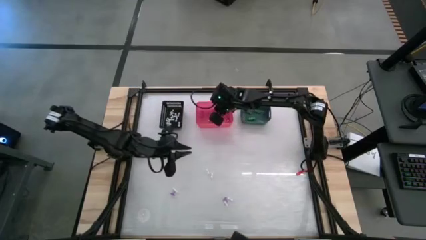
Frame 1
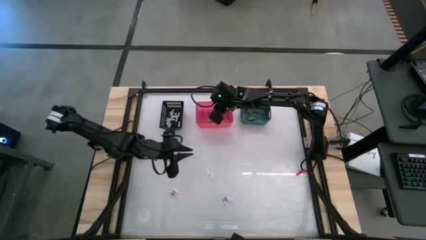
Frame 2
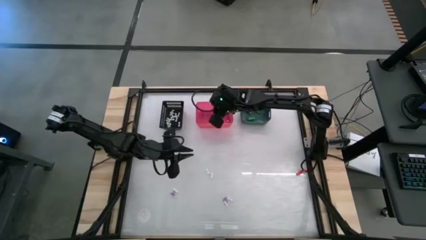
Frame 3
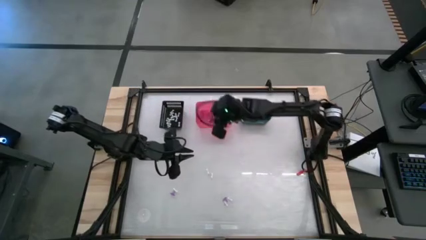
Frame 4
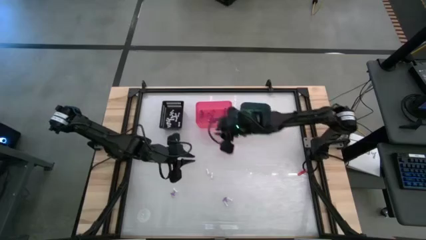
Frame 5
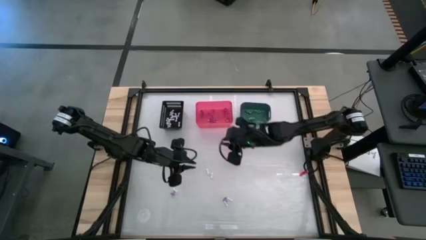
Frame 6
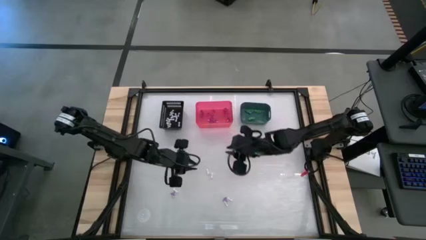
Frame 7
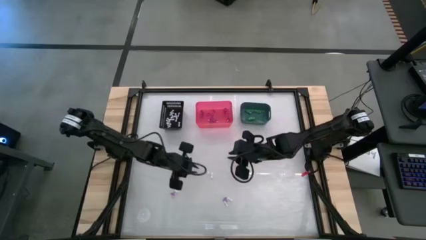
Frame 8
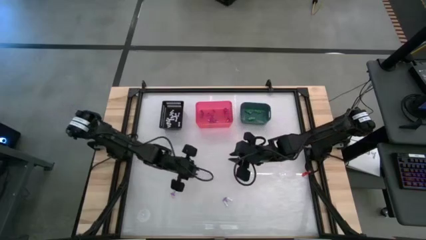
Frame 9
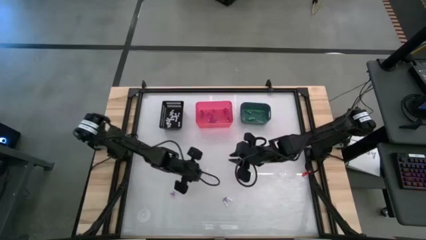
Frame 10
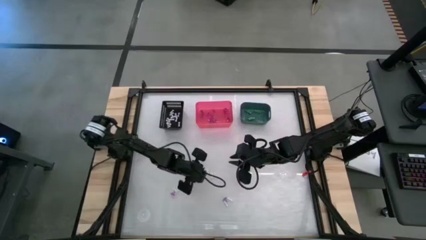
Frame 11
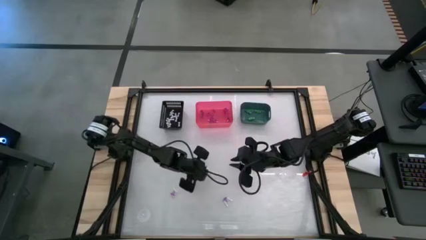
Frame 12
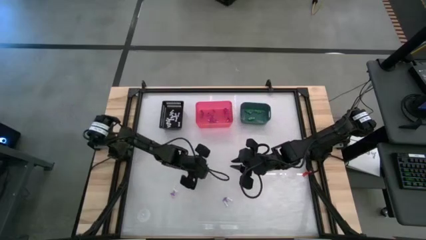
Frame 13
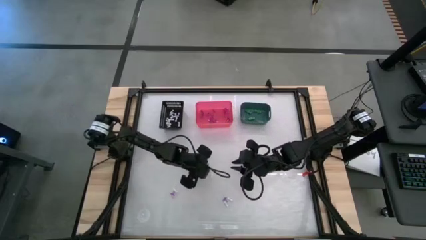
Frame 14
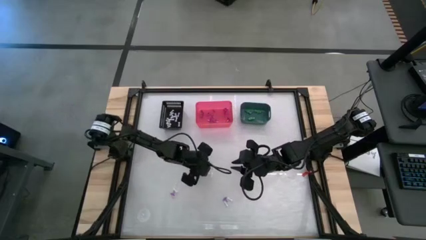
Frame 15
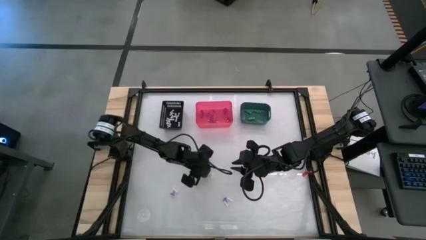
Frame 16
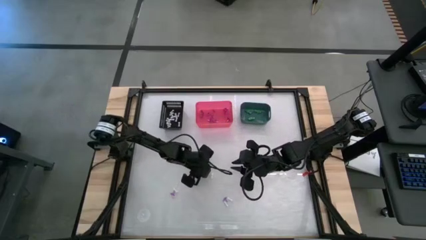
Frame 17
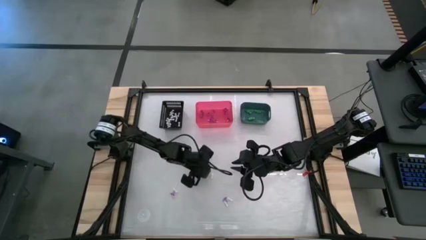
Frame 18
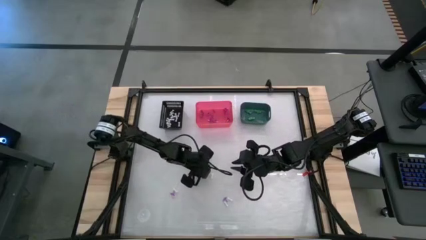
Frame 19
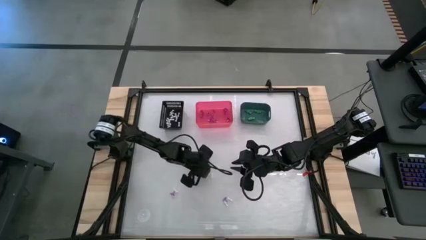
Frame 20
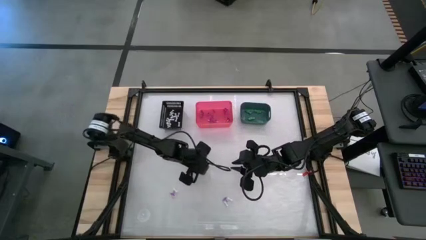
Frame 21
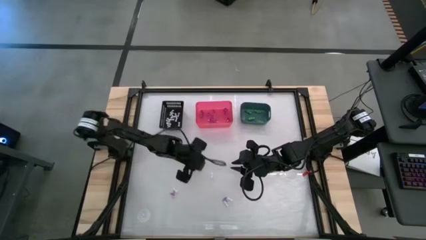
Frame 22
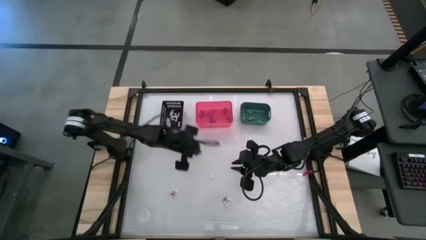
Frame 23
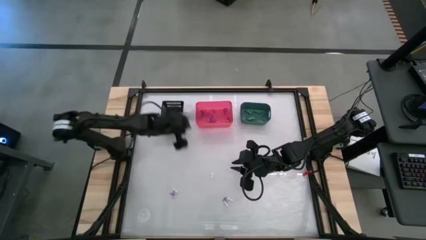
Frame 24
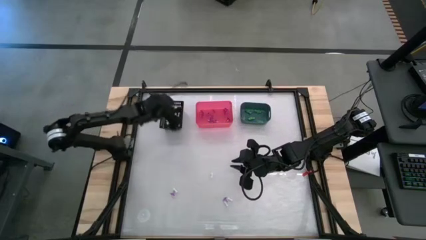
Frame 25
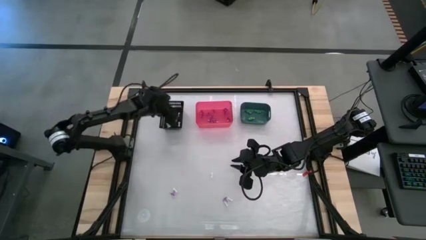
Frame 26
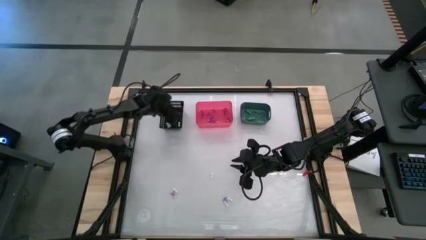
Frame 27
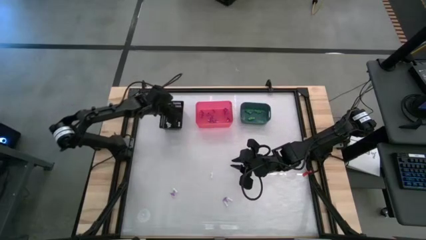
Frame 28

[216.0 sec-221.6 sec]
Task: Sort Halloween decoration
Put the white bone toy into the black bin

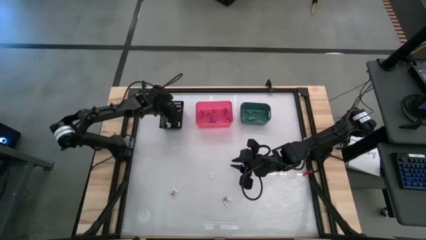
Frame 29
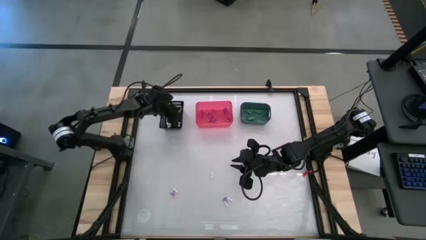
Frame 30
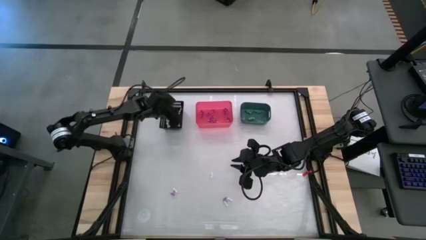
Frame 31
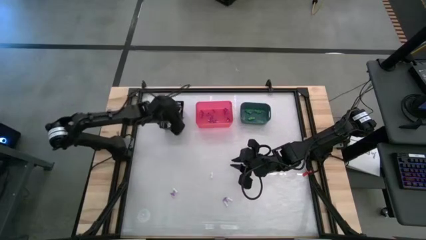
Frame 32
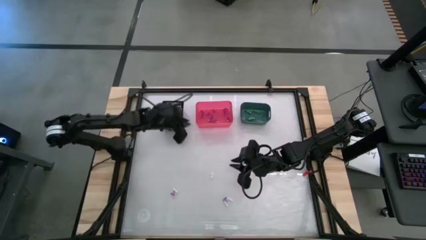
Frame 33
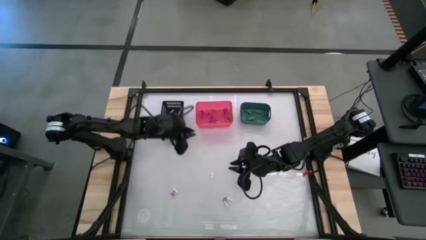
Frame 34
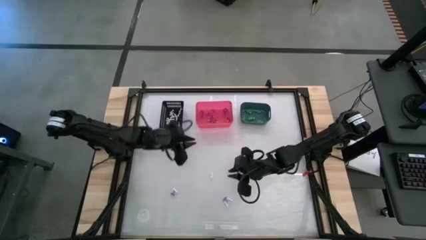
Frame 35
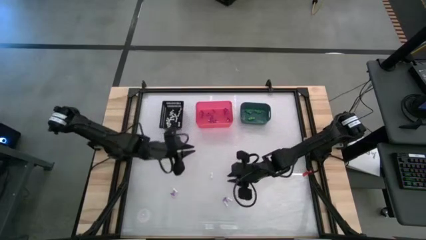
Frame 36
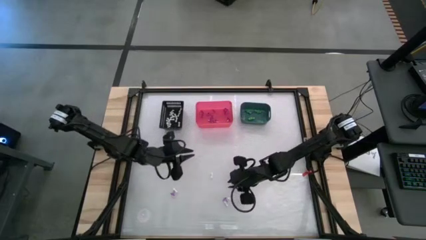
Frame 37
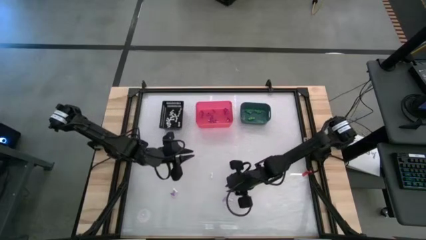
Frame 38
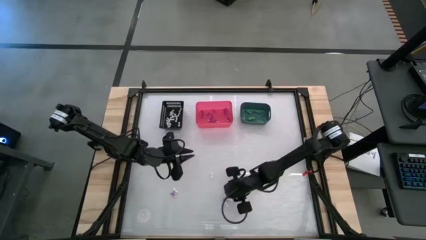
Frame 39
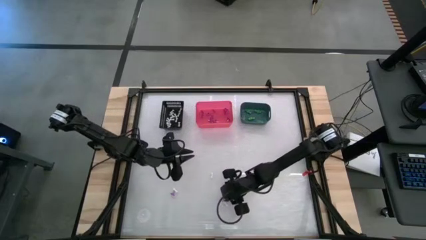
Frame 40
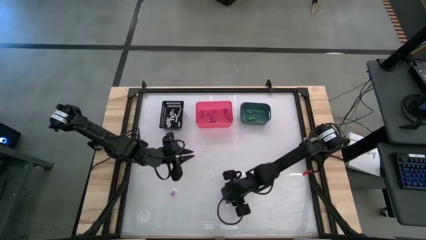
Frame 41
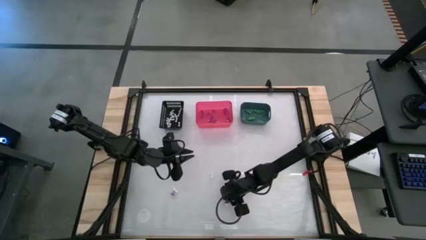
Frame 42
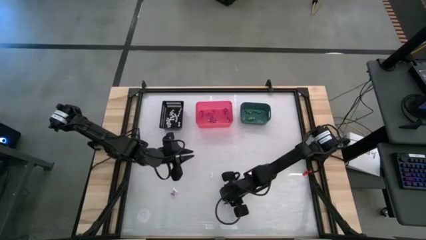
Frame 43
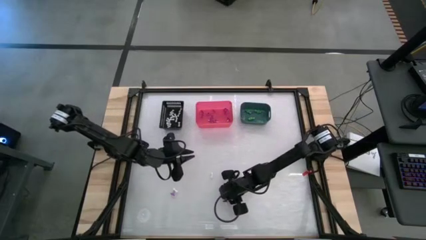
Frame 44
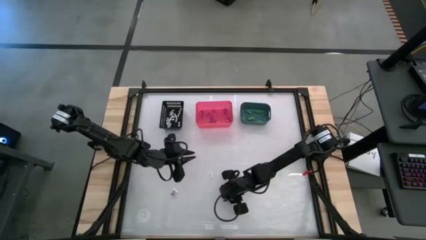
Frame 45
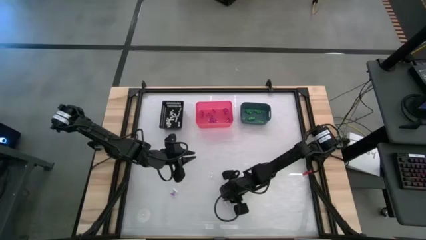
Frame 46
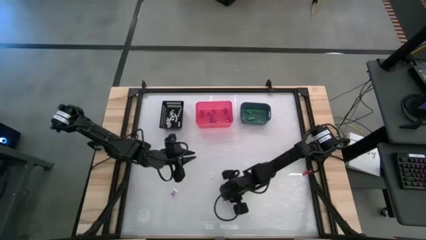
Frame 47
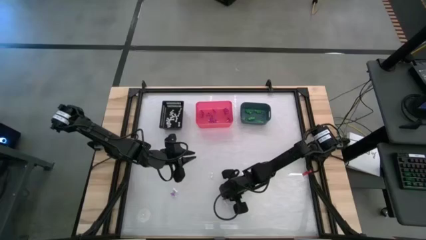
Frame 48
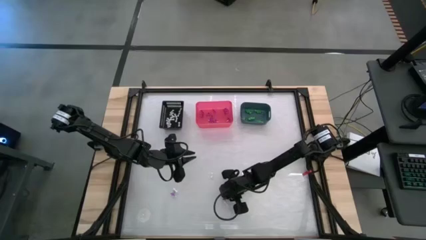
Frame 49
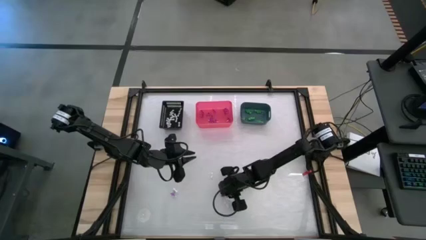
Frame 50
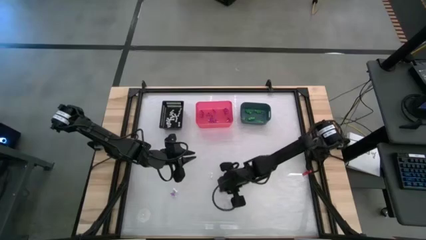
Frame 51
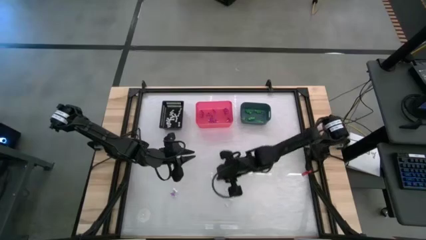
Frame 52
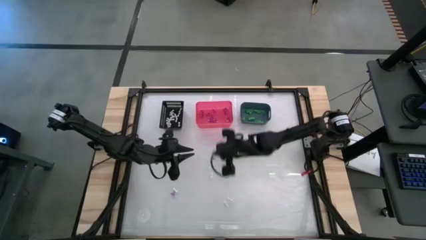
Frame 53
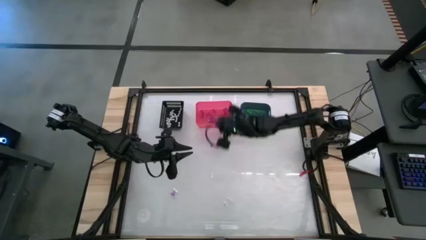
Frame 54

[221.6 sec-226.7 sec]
Put the purple hat toy into the pink bin

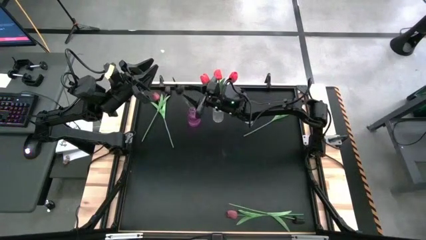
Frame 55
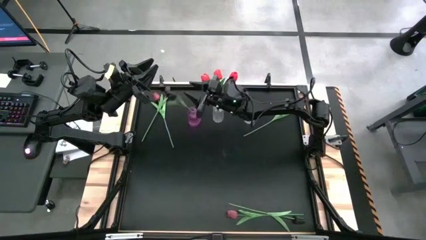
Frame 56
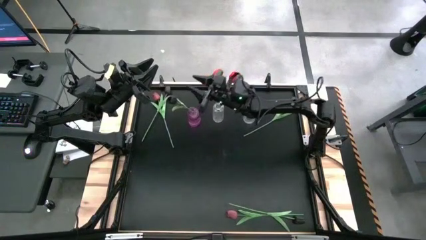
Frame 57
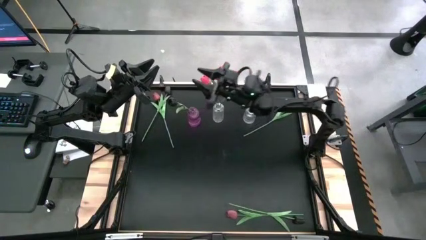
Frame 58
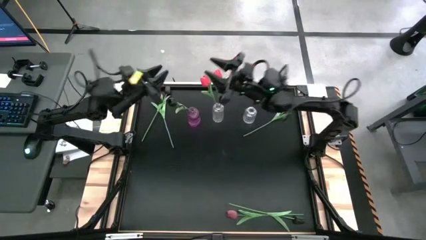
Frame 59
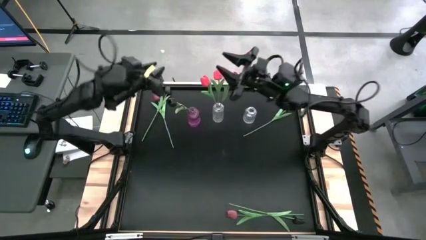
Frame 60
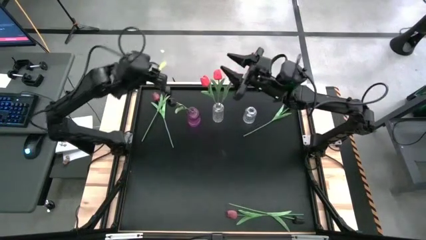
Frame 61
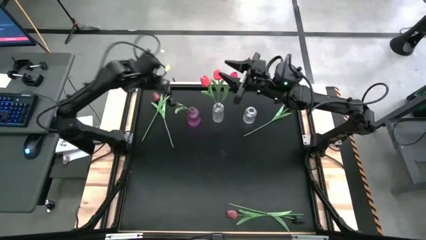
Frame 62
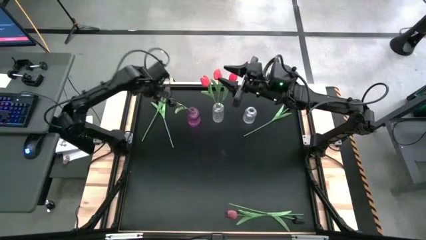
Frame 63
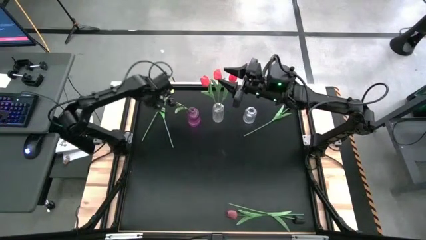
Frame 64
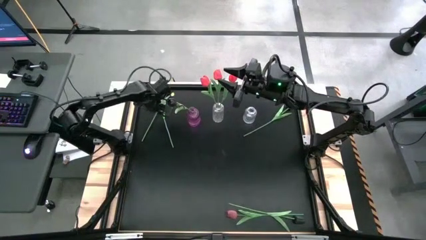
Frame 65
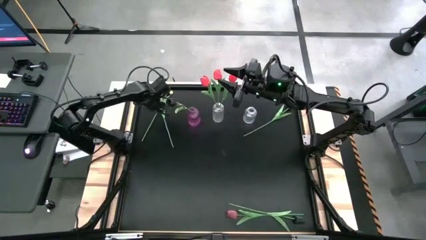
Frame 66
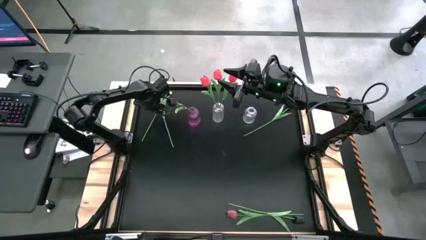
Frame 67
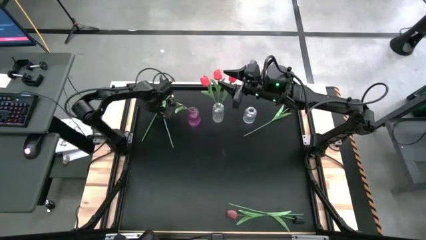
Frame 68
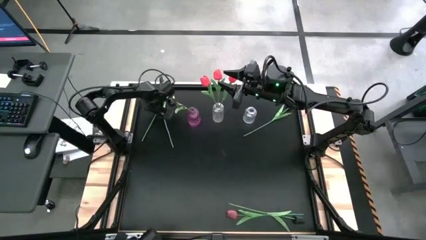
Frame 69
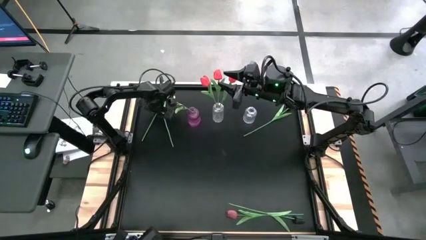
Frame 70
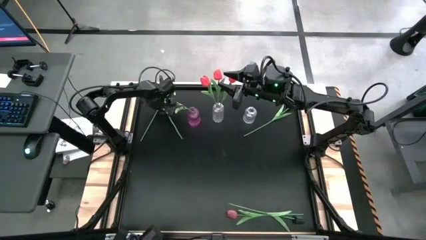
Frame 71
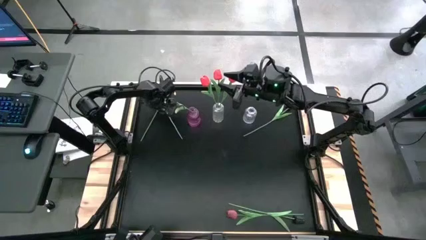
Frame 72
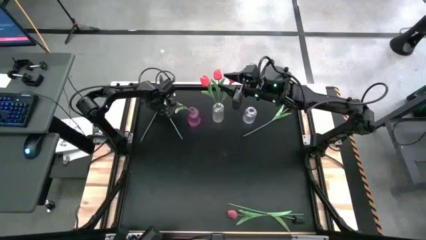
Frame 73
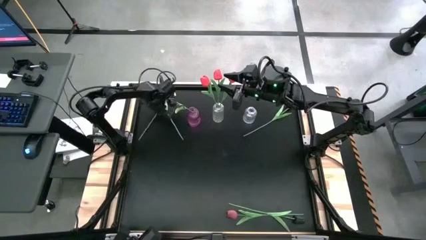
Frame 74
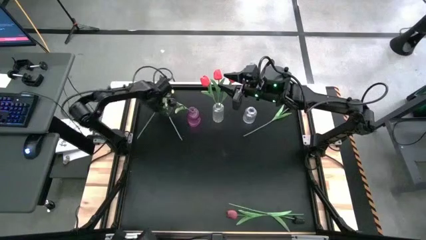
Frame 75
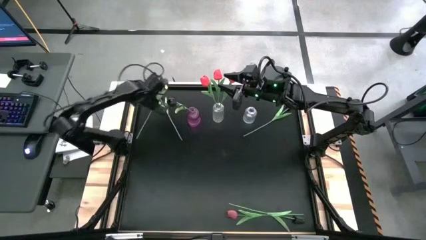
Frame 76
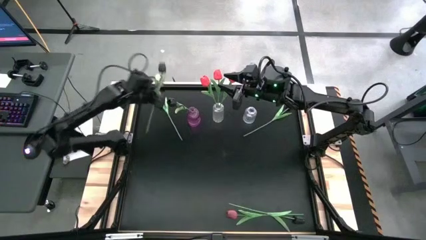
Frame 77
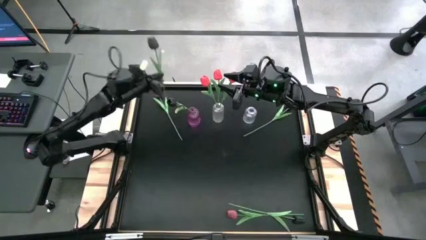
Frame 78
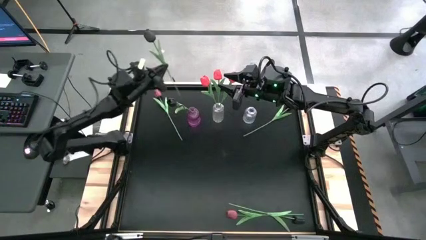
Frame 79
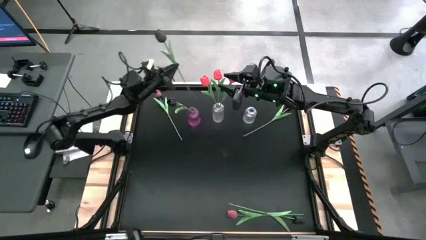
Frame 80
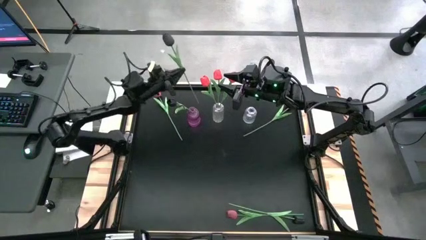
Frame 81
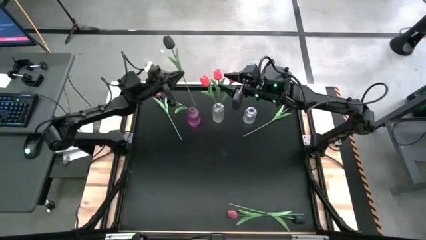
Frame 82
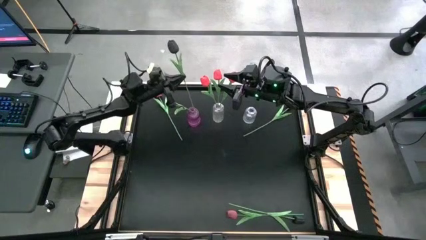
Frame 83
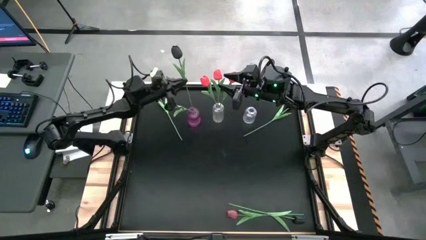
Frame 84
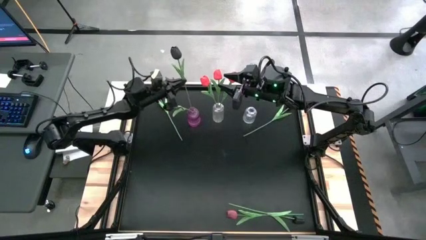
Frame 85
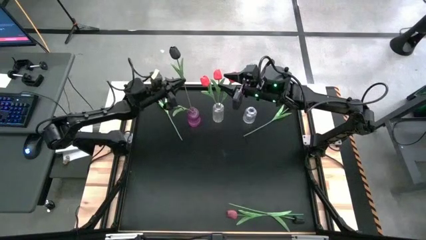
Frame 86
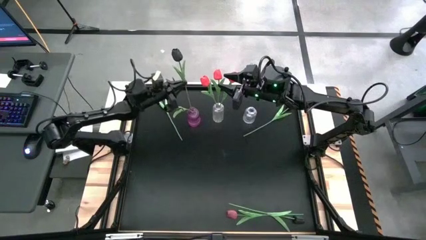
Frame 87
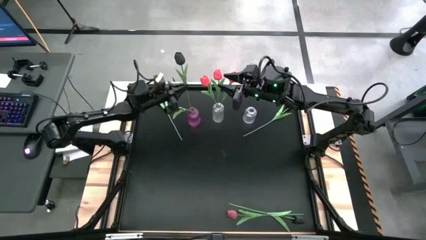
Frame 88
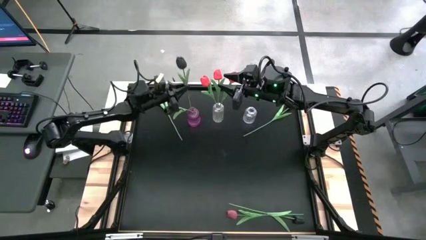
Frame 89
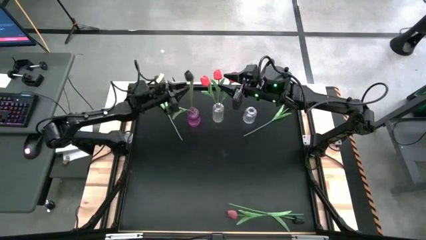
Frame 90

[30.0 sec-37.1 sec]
Task: Sort flowers into vase by color
Put the top black tulip into the violet flower vase
